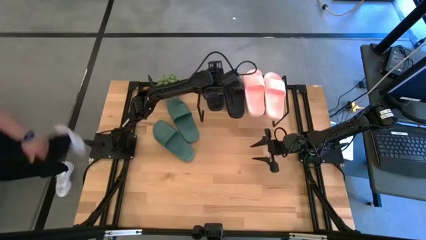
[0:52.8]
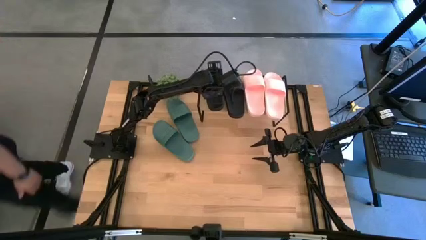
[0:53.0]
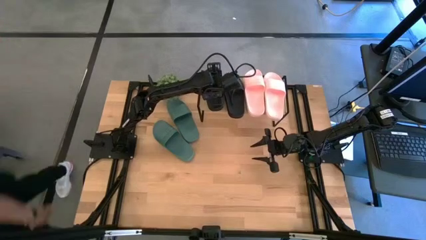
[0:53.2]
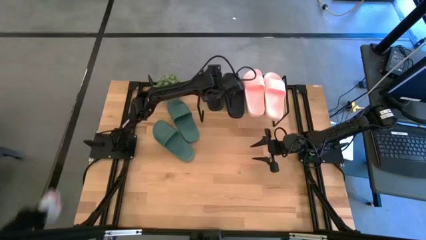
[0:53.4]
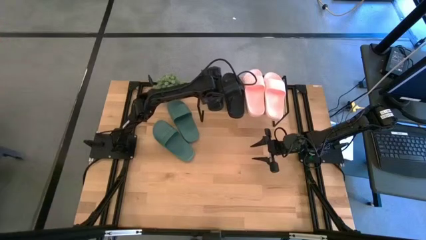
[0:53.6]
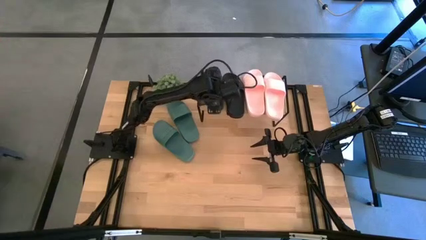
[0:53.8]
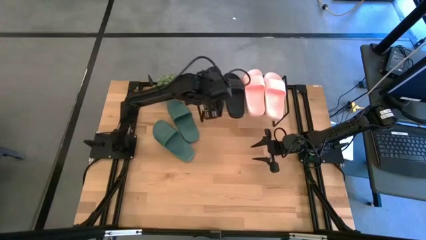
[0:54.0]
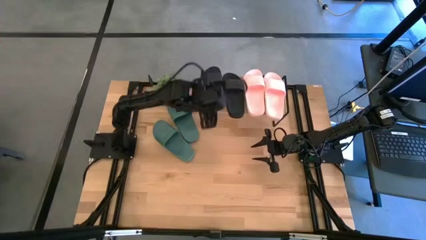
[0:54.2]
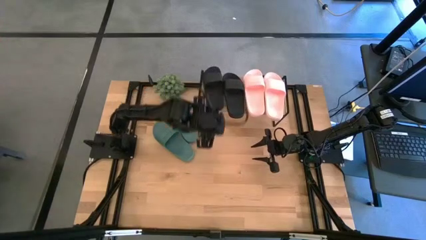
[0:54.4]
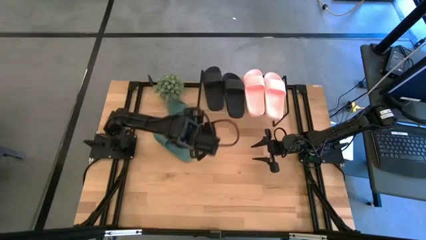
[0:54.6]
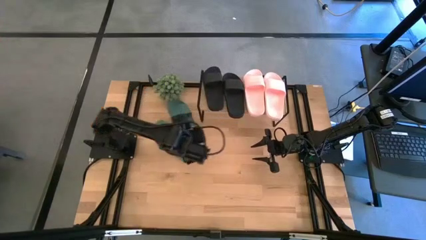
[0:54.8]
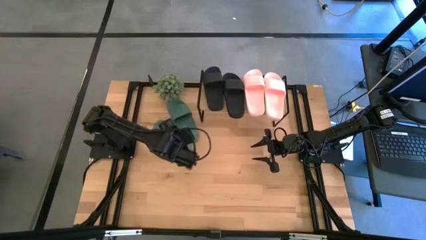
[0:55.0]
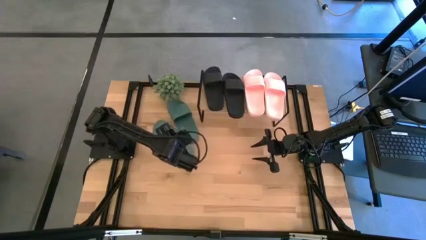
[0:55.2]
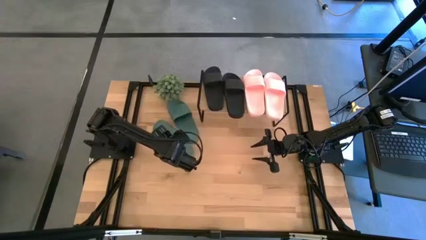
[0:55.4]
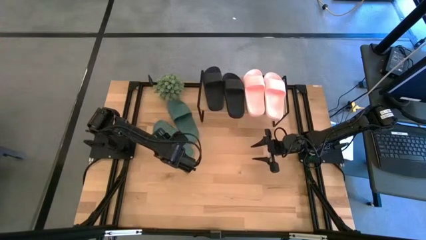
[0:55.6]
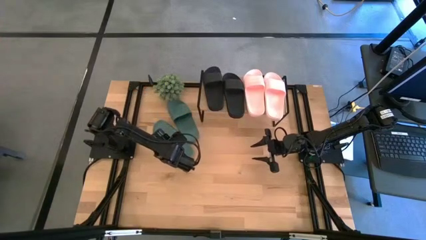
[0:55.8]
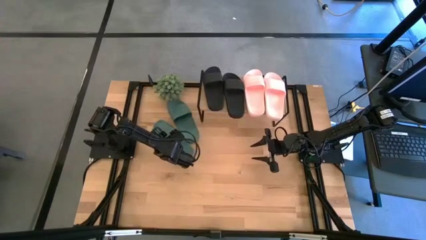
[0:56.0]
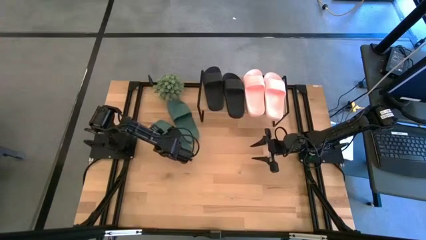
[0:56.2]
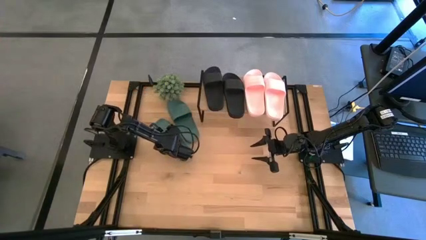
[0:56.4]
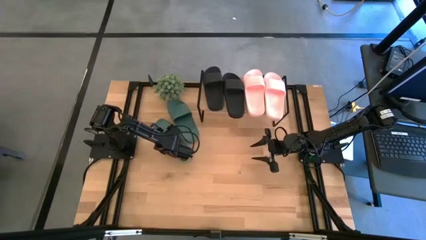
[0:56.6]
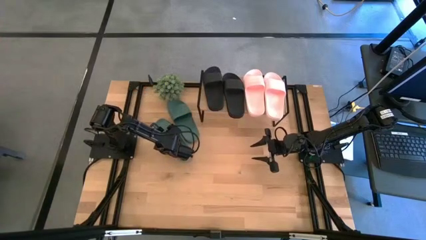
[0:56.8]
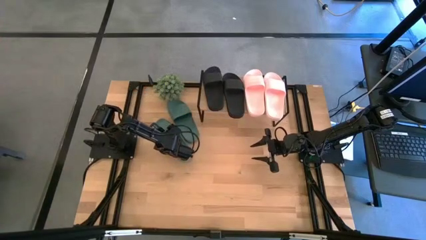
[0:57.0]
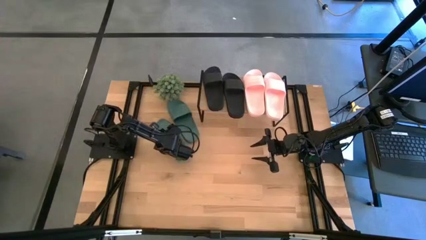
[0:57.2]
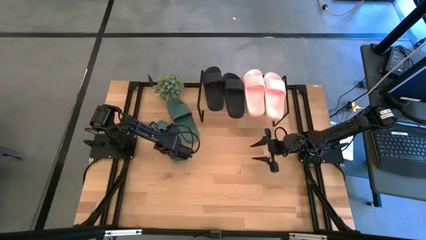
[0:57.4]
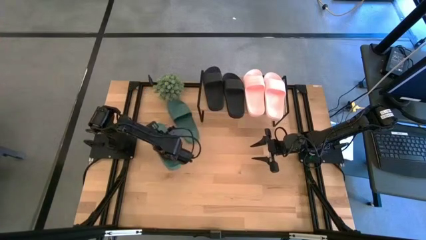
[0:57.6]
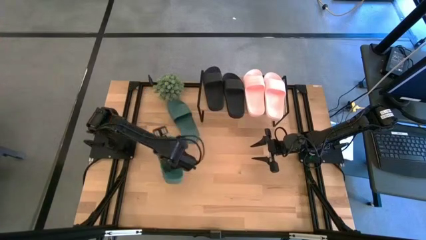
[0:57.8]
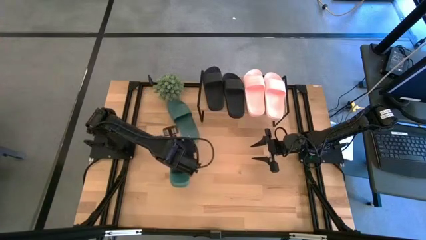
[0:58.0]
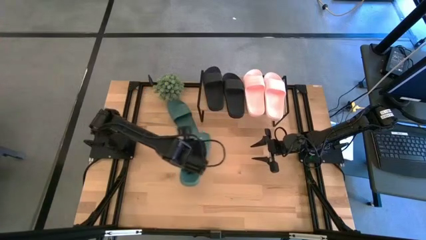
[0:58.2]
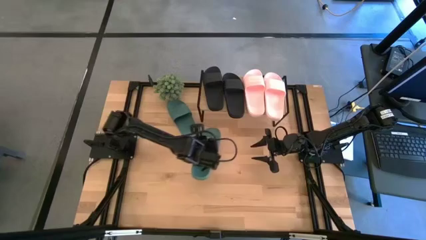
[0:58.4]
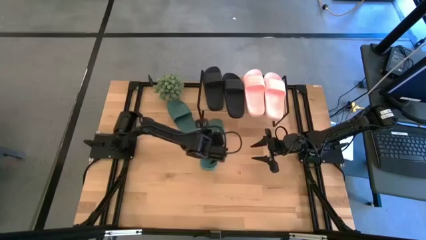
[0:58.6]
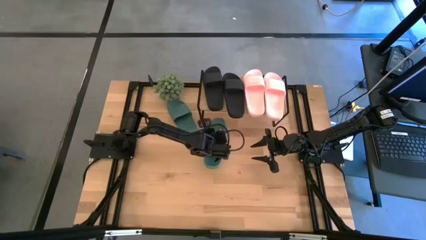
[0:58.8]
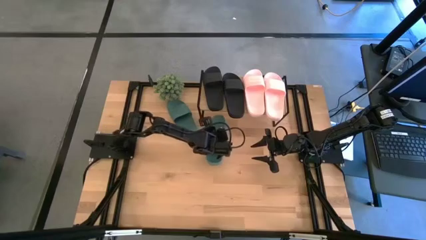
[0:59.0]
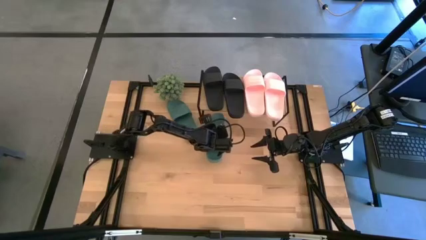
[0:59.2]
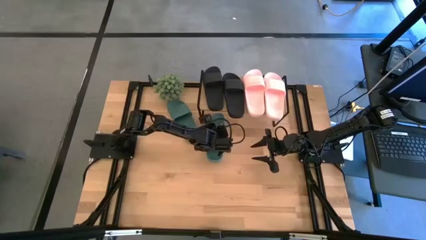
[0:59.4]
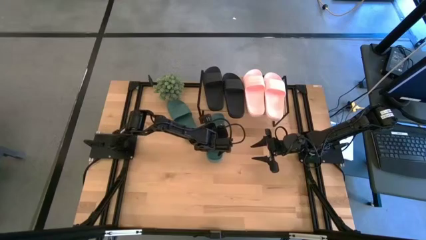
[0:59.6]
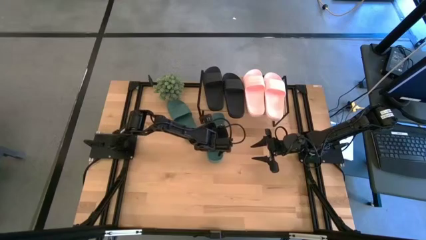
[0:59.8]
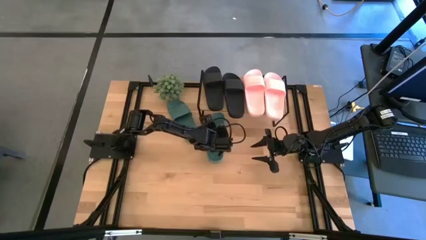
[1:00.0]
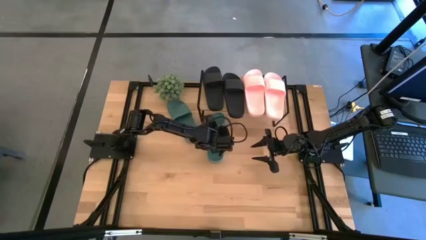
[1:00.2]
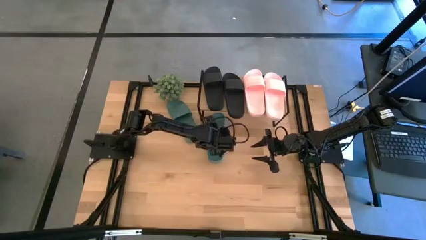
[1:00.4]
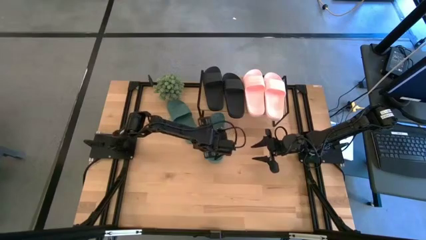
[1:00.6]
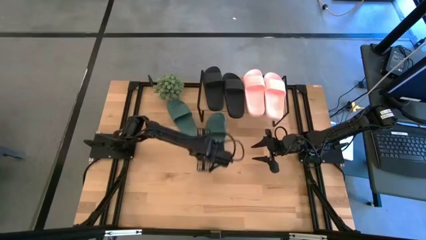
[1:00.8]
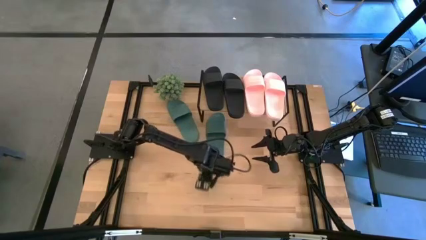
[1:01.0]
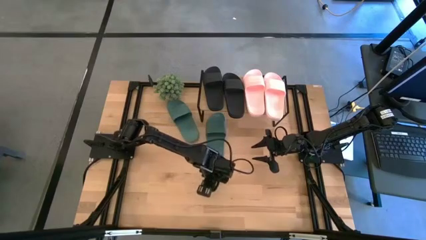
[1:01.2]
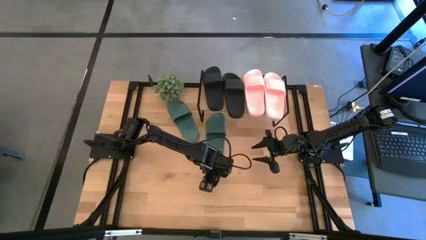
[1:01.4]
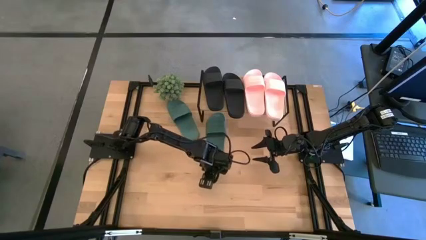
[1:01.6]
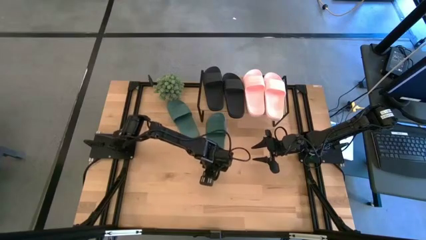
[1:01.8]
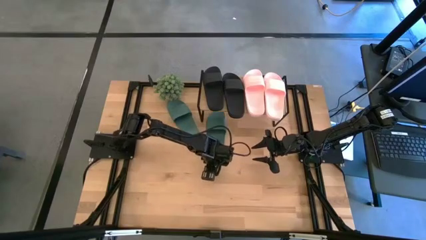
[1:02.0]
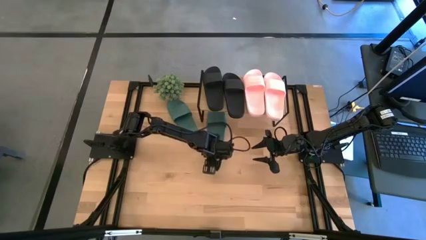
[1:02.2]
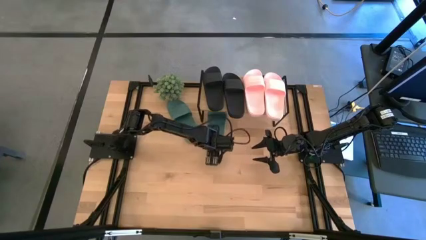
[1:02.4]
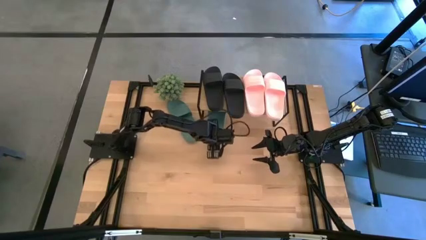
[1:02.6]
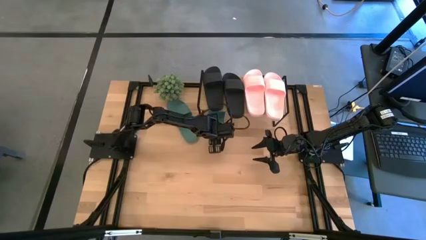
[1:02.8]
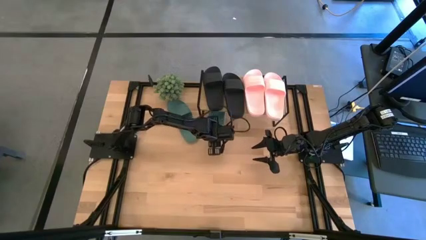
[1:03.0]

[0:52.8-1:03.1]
Task: Pick and place slides into the shelf
Put the left green slide under the shelf

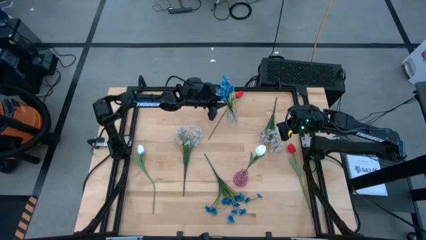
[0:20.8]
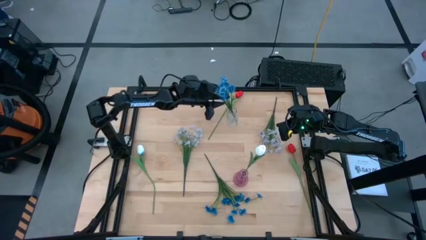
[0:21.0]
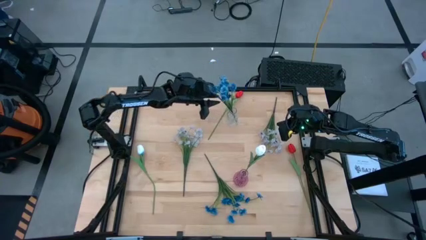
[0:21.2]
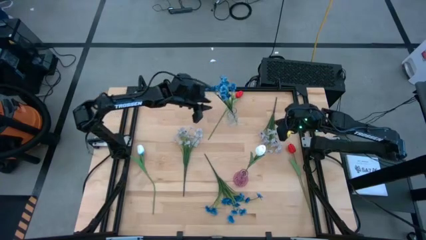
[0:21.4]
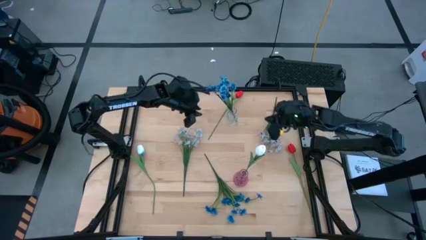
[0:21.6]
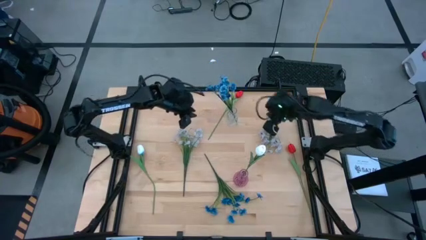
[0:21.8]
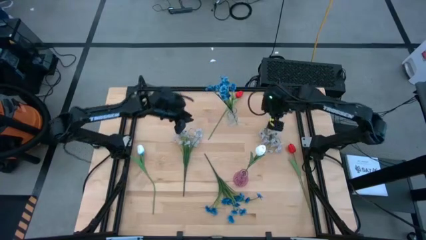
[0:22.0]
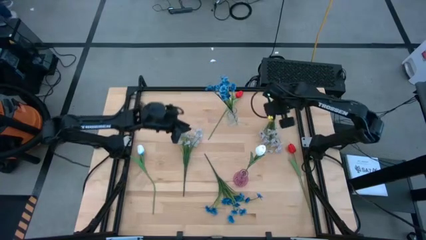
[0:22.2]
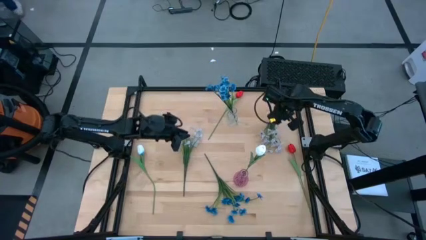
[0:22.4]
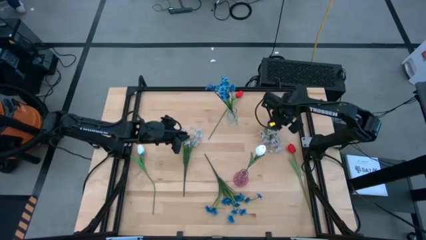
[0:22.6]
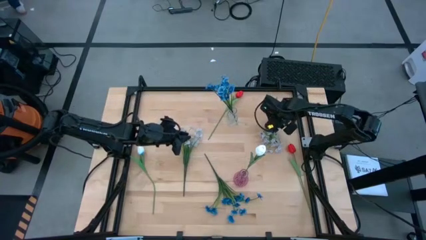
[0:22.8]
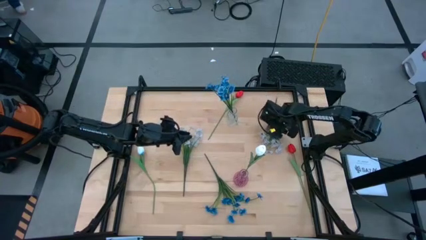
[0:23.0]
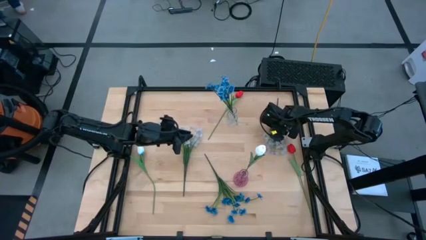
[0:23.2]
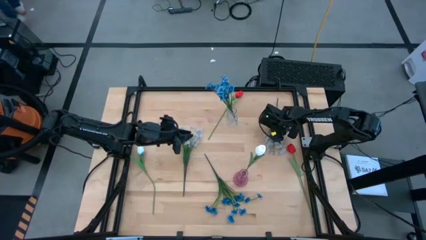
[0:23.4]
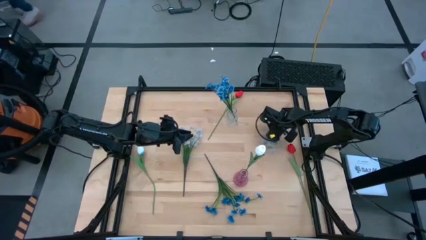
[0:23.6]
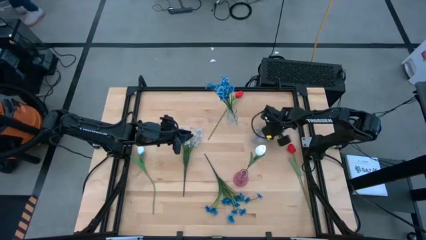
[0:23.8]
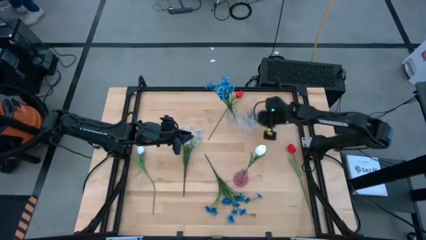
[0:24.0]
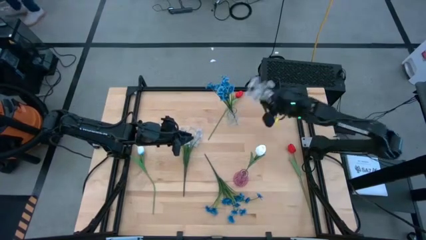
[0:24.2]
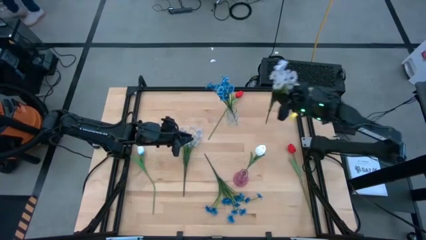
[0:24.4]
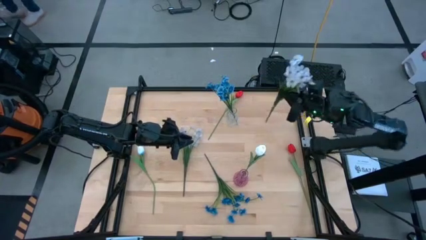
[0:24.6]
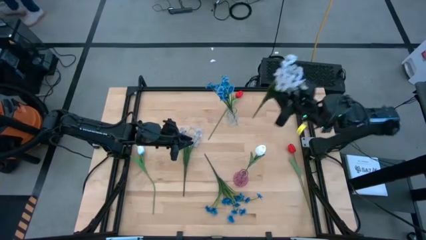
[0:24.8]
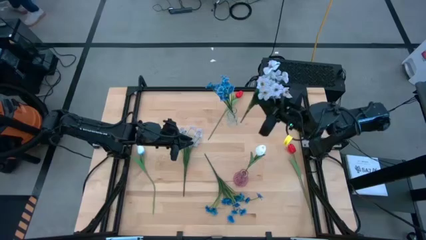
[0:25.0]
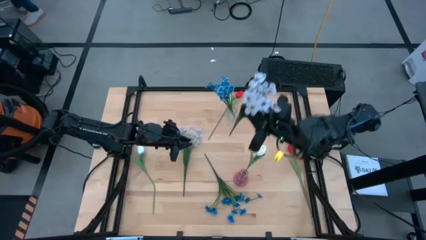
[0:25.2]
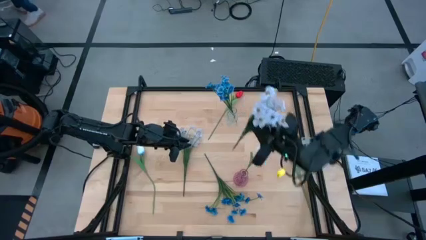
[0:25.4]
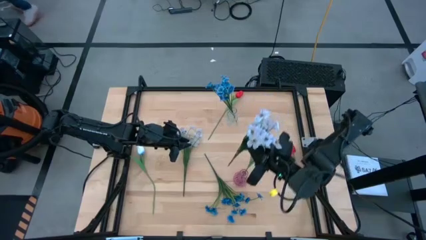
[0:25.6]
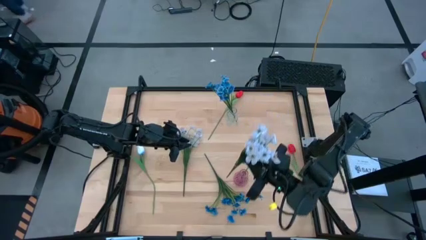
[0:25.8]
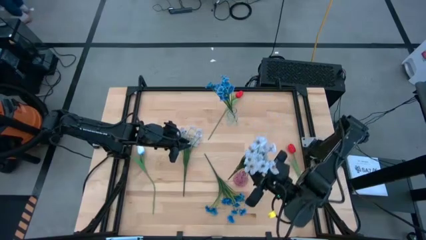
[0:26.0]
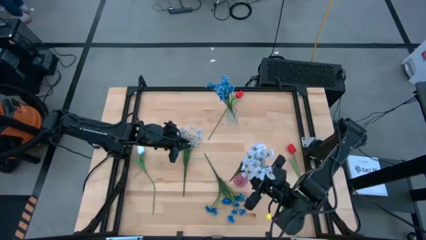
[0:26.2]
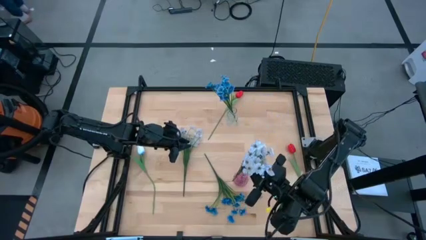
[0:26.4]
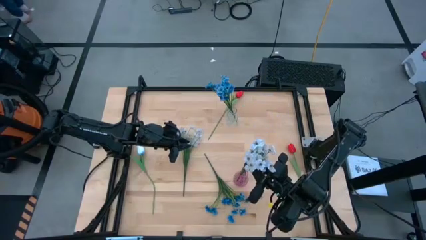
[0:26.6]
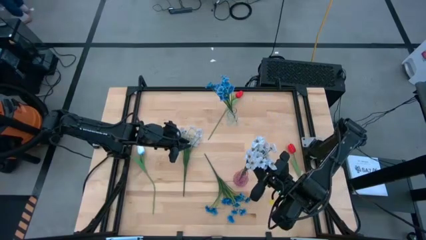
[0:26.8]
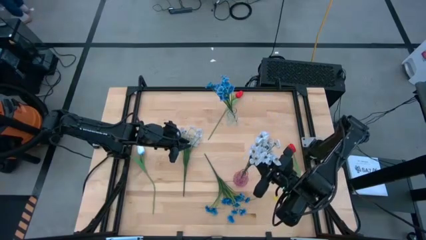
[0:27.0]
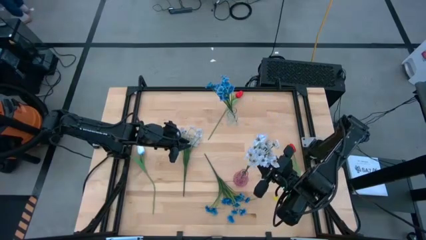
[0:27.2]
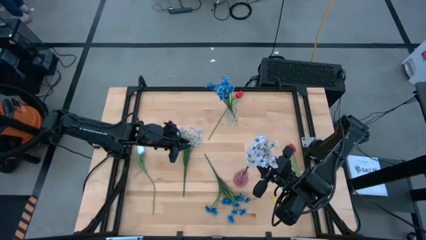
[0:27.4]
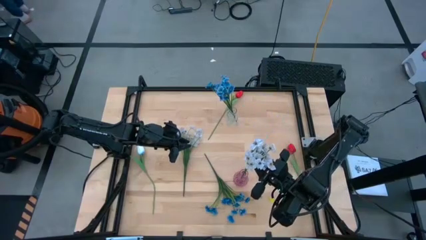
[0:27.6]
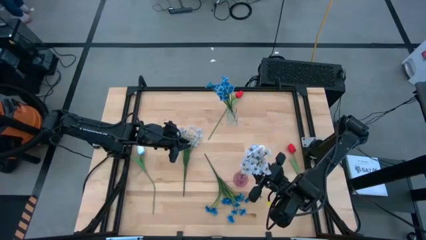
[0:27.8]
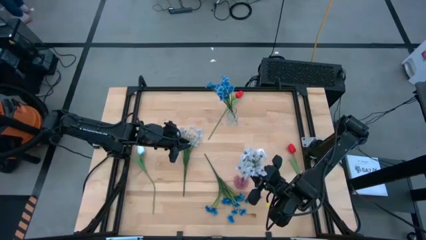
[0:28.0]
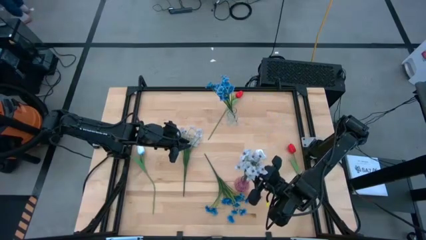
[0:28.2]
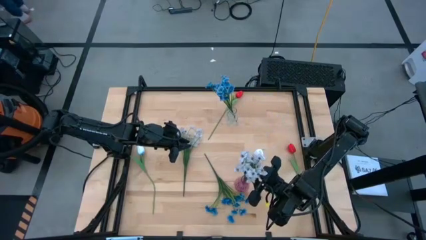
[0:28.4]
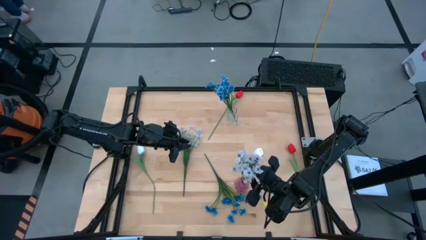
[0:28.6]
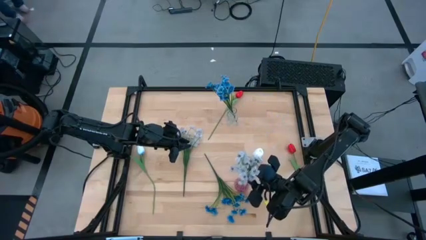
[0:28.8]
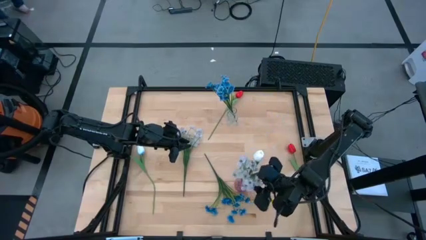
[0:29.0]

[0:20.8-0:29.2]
Task: Sort flowers into vase by color
Put the right white flowers into the violet transparent vase
